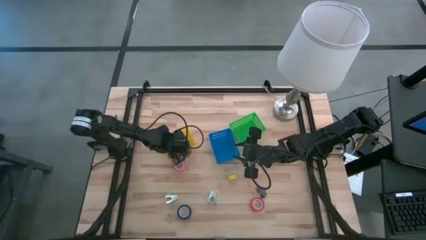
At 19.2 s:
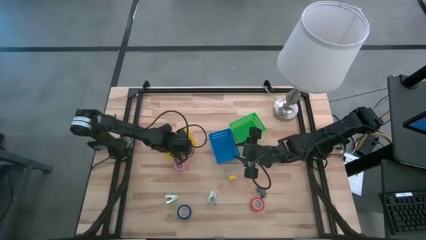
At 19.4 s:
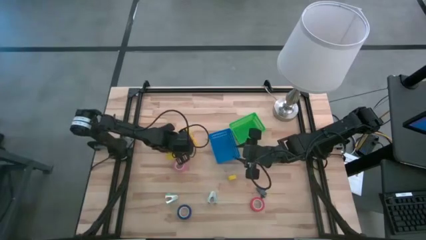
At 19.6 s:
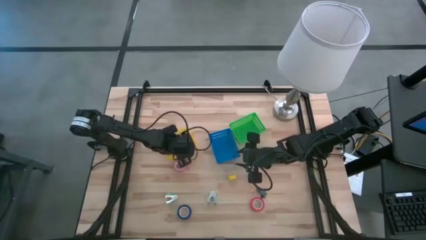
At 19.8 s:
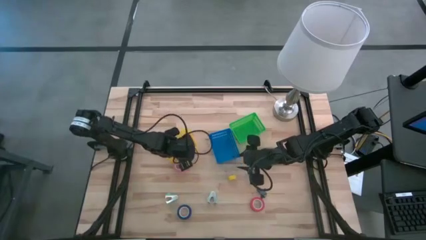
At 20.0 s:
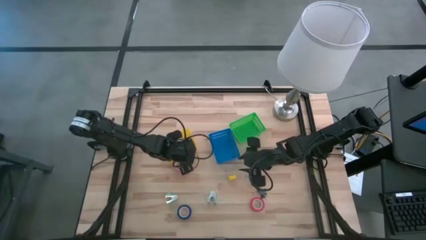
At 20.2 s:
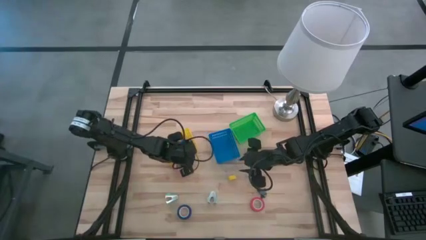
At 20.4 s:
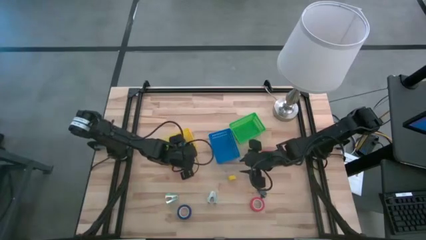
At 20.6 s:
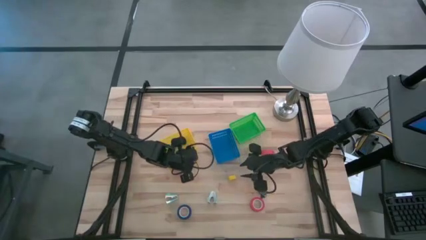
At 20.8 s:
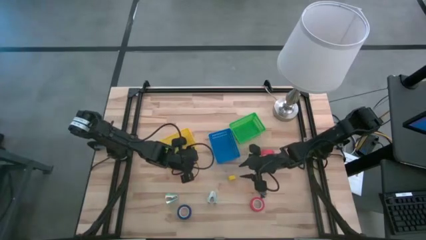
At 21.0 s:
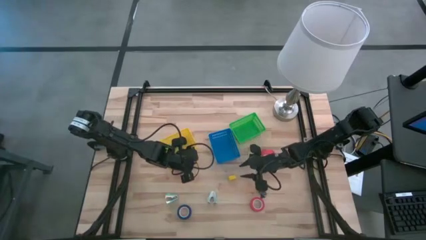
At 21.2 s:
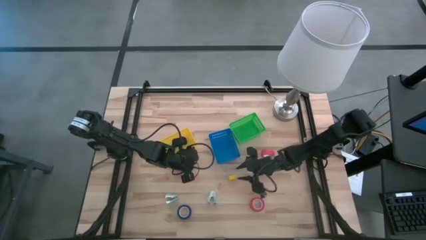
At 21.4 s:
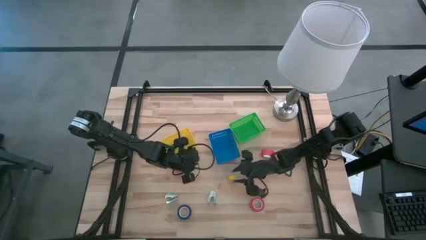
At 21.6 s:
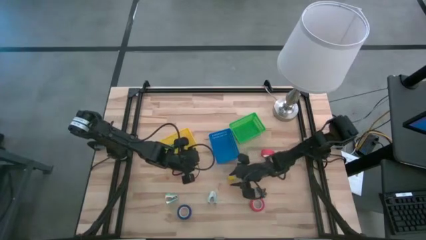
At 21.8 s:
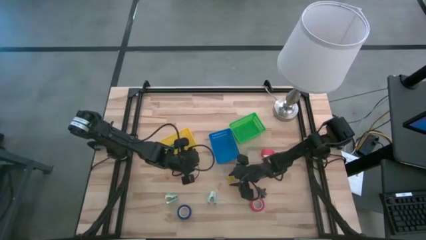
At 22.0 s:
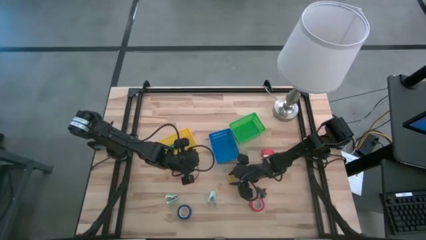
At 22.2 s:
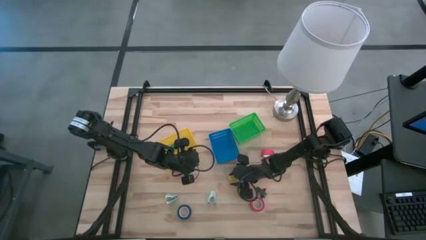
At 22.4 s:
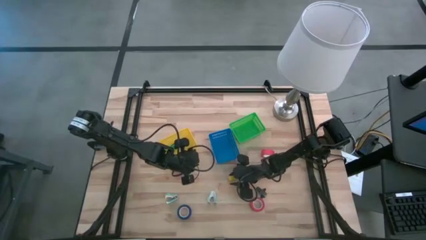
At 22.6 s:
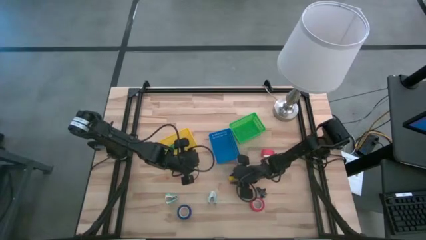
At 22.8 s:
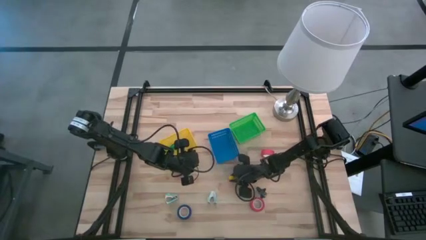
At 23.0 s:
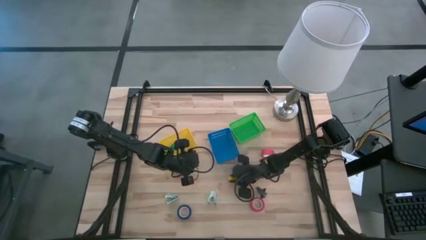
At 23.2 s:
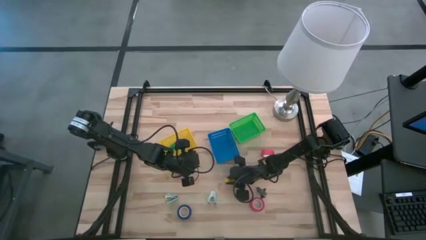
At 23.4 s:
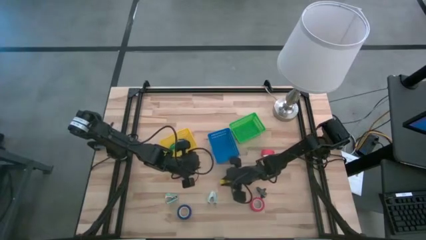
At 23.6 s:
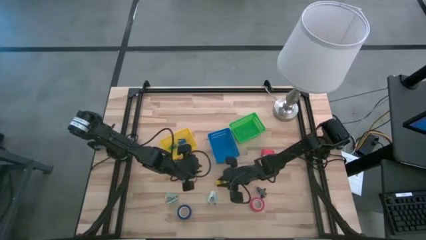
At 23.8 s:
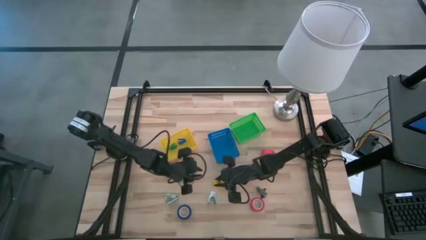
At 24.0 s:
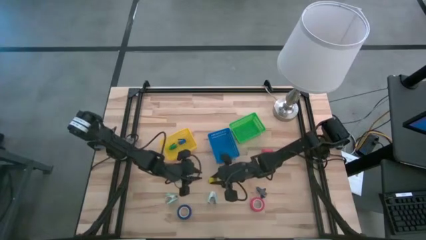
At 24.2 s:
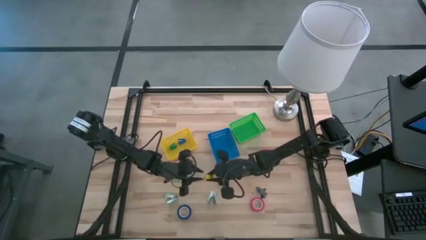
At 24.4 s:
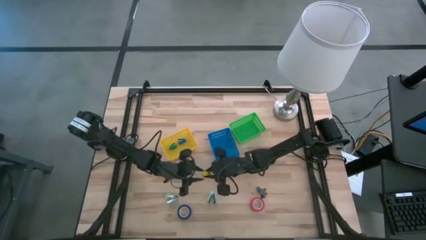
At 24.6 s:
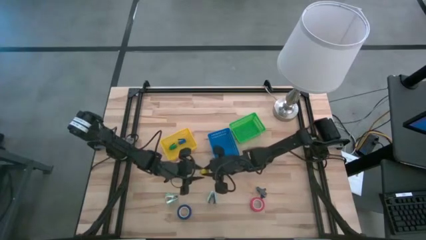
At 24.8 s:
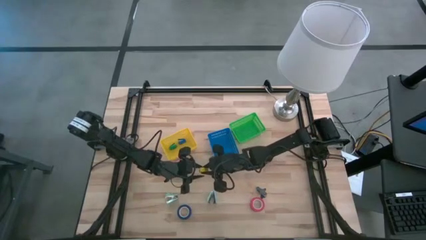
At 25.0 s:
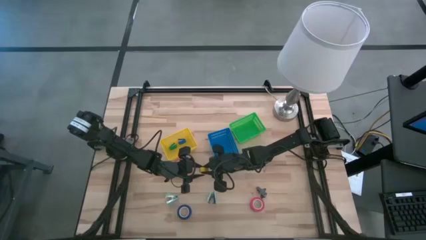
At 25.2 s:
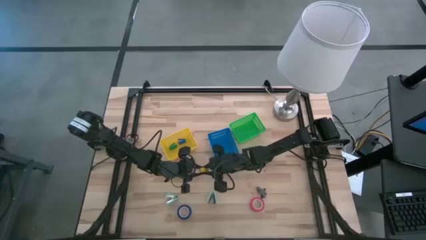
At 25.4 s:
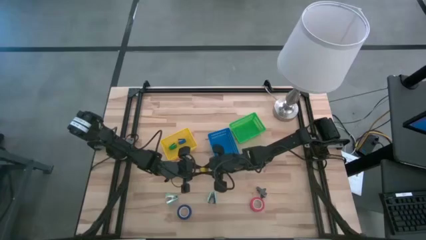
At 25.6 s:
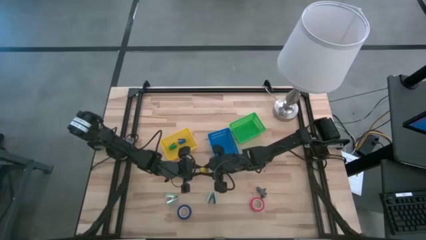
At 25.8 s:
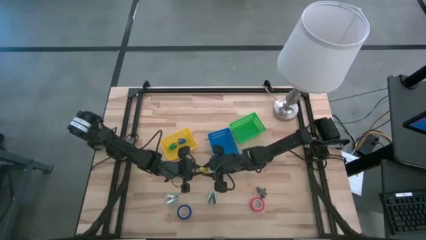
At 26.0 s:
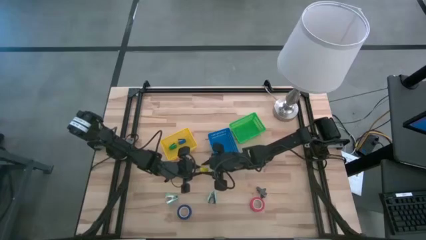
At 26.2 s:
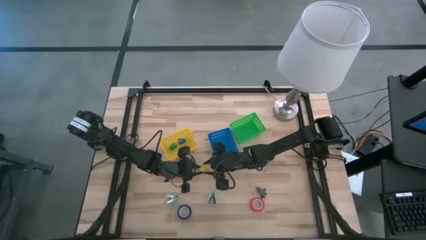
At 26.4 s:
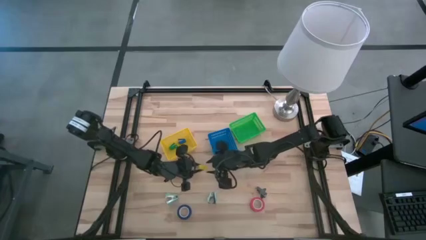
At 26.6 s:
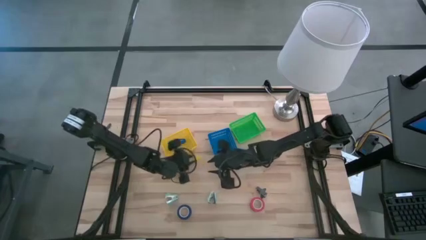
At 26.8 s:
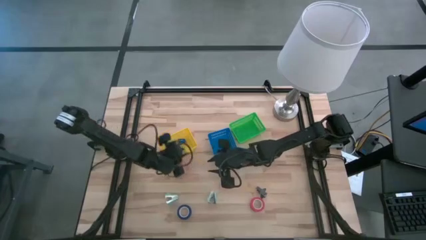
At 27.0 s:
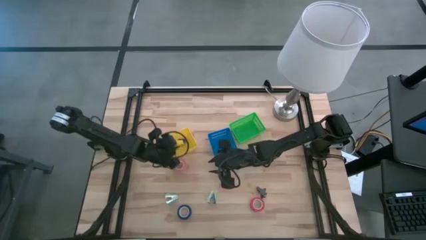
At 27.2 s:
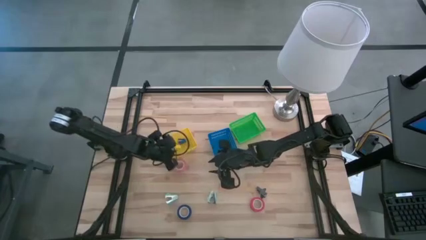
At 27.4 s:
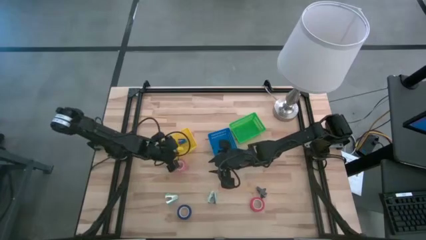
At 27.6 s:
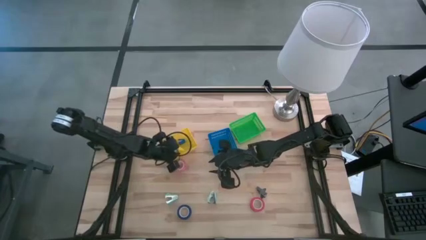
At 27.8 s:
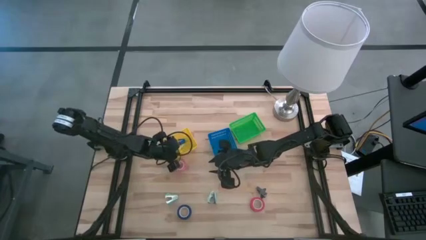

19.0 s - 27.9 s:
Task: Pick and place Stapler, Stapler remover, tape
Put the yellow stapler into the yellow bin

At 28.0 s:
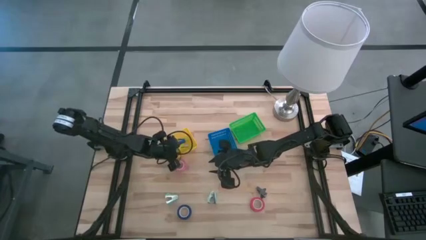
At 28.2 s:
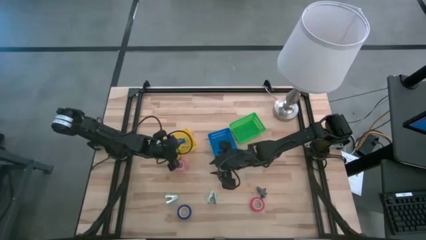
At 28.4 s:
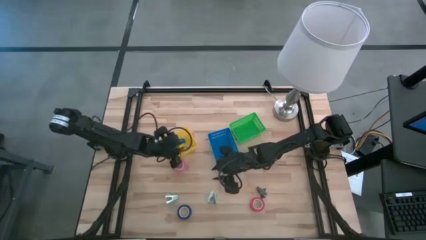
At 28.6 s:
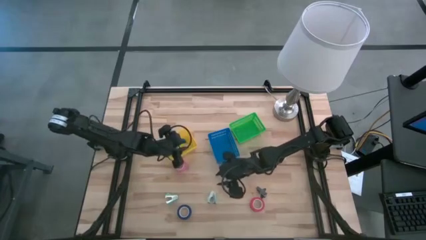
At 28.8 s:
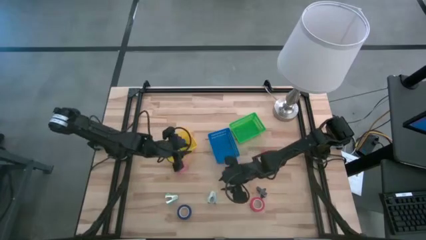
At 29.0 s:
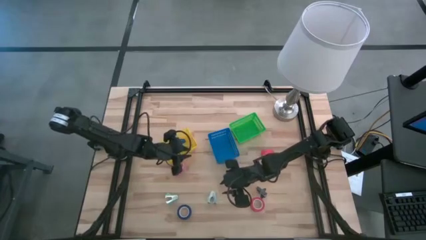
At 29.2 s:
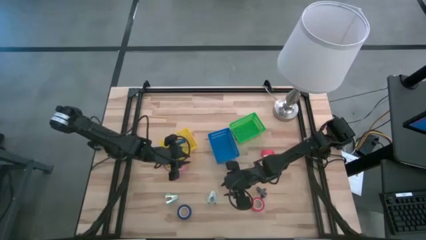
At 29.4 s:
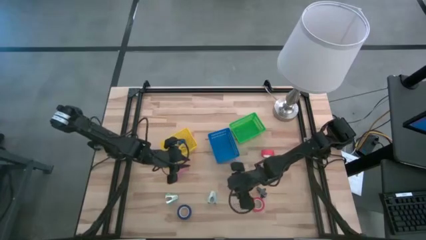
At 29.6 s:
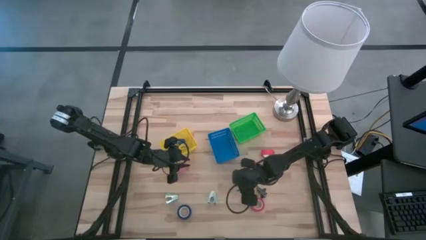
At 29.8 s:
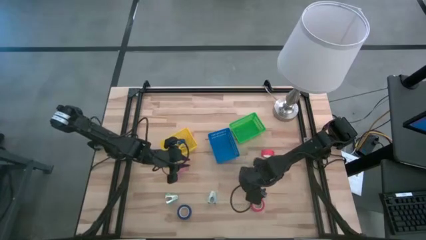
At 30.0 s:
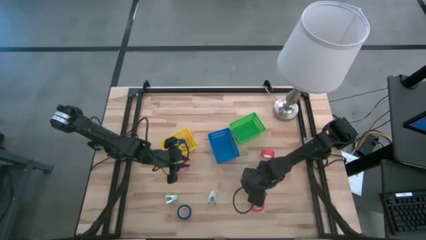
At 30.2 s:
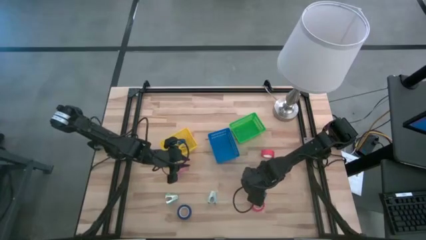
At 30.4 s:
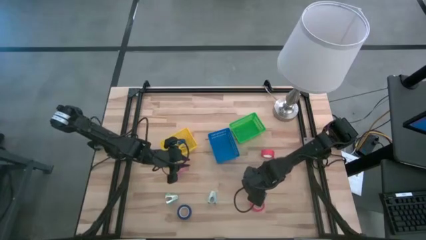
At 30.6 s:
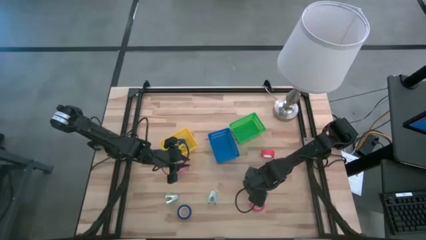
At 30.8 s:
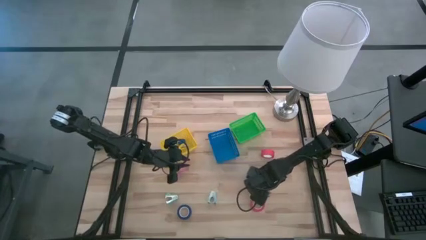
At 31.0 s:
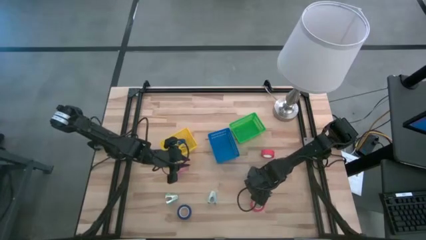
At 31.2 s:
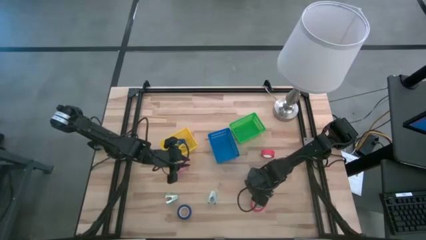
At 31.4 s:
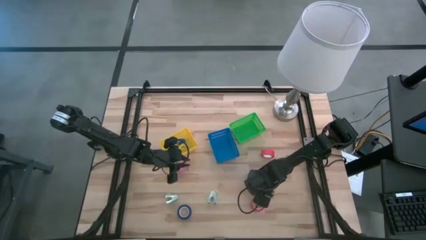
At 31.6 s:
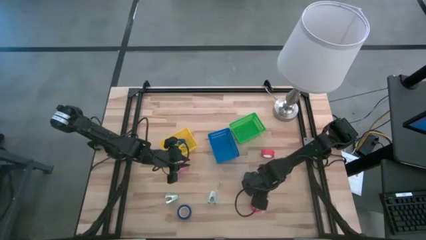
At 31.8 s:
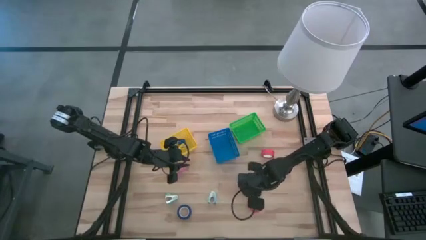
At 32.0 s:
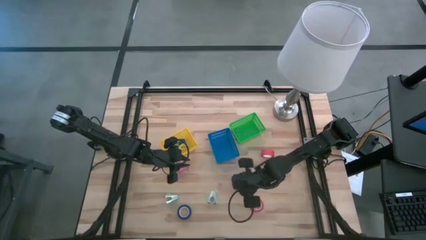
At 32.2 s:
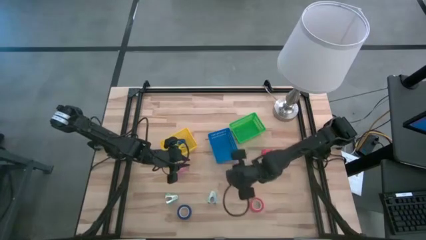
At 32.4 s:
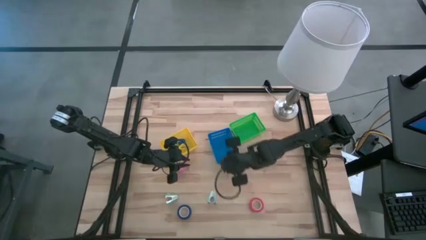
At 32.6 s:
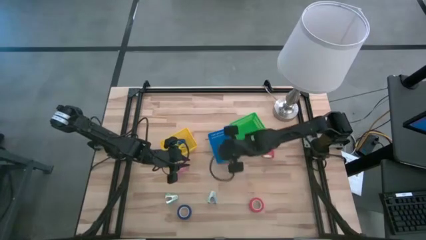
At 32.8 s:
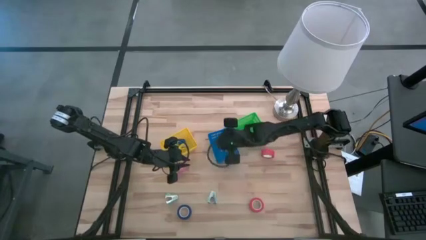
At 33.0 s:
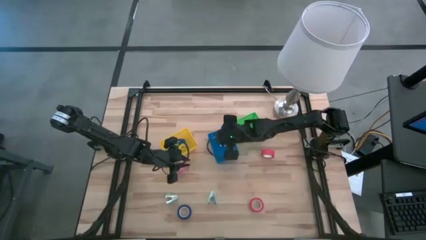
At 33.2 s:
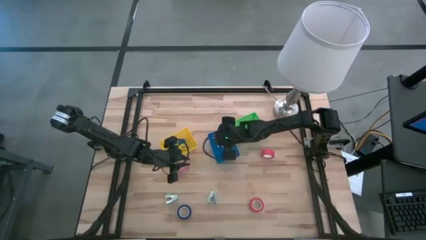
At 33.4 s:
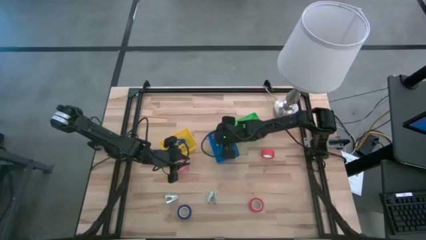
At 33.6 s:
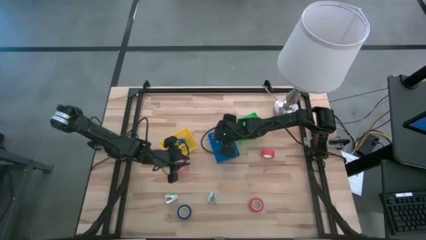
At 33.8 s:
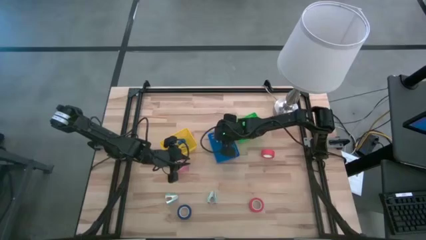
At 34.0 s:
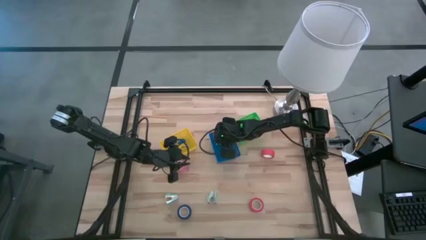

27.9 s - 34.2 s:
Put the black staple remover into the blue bin
